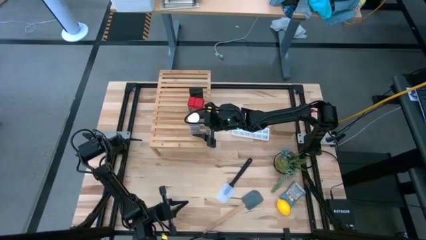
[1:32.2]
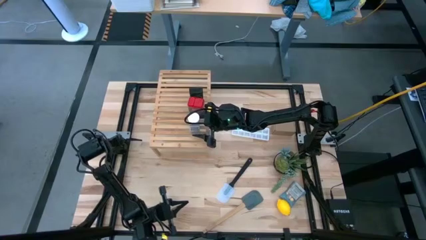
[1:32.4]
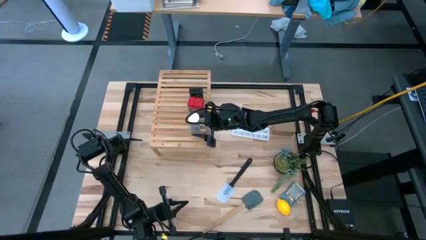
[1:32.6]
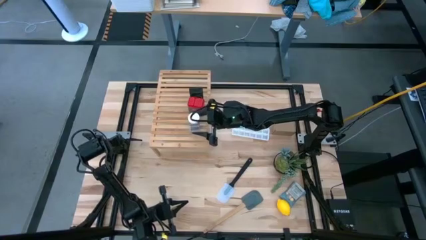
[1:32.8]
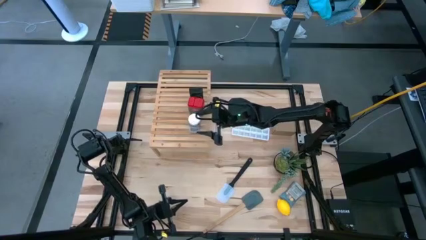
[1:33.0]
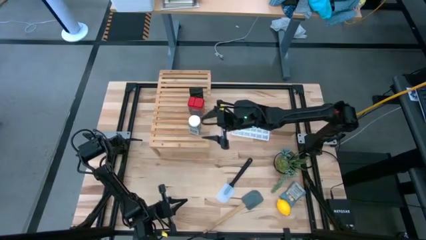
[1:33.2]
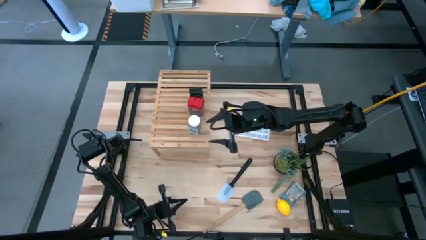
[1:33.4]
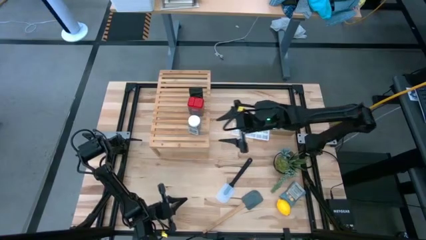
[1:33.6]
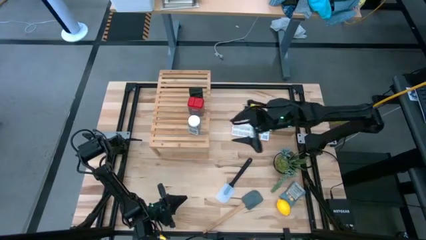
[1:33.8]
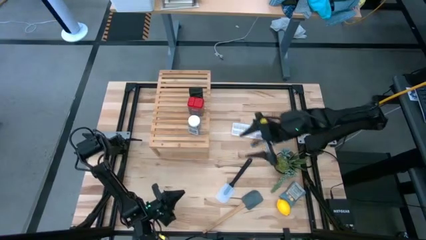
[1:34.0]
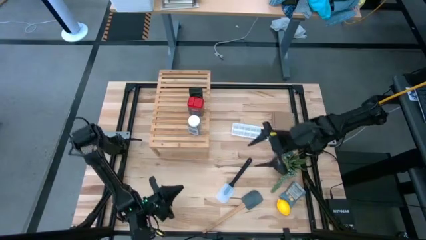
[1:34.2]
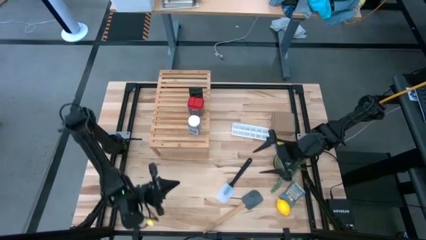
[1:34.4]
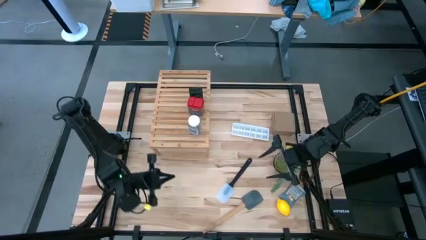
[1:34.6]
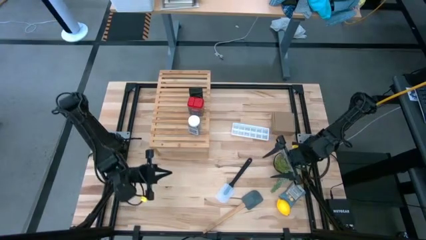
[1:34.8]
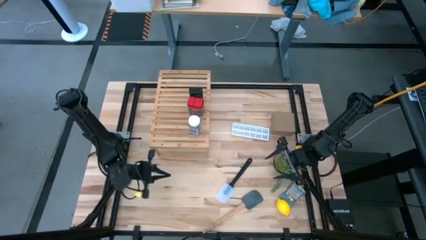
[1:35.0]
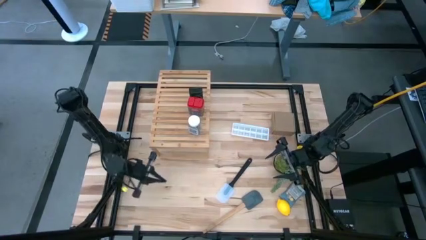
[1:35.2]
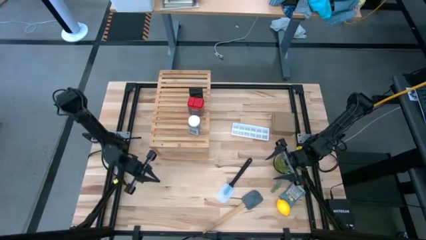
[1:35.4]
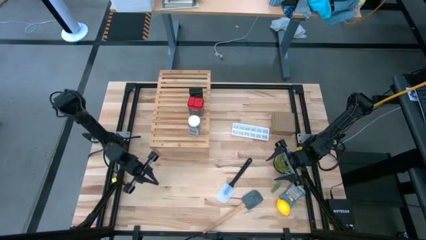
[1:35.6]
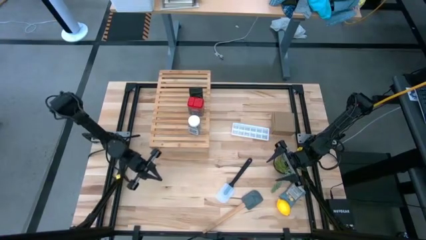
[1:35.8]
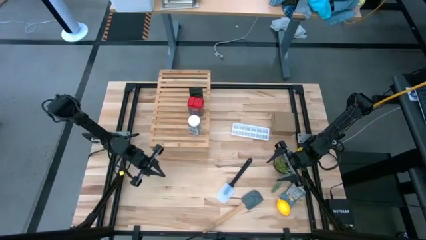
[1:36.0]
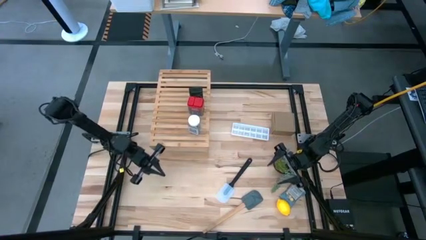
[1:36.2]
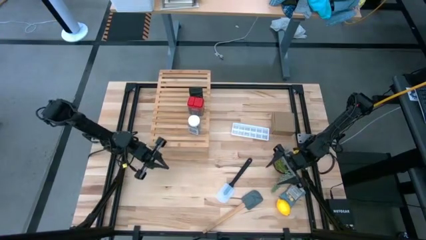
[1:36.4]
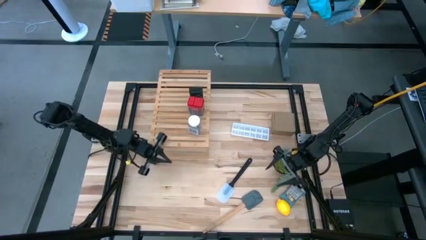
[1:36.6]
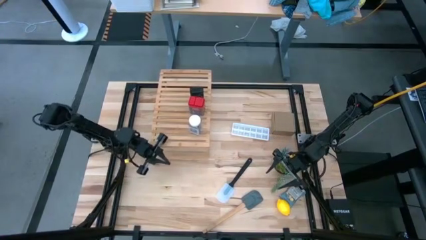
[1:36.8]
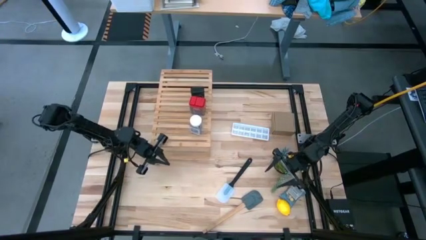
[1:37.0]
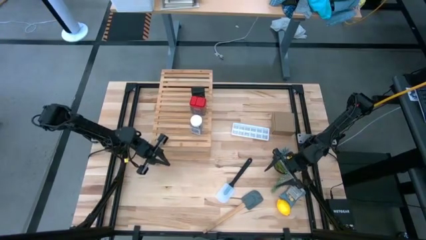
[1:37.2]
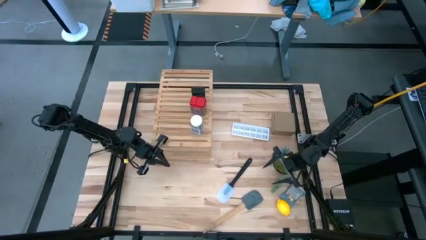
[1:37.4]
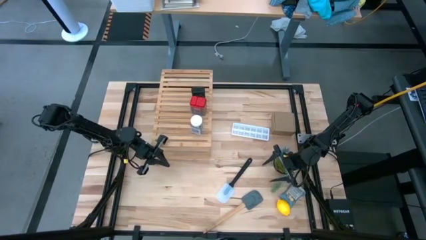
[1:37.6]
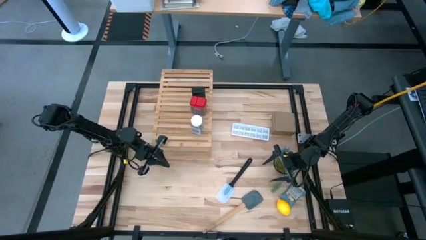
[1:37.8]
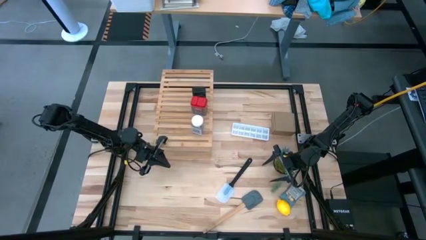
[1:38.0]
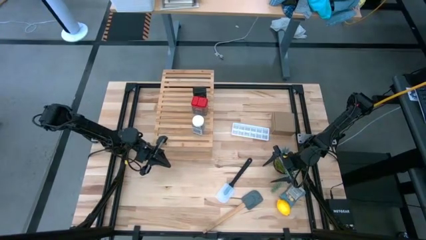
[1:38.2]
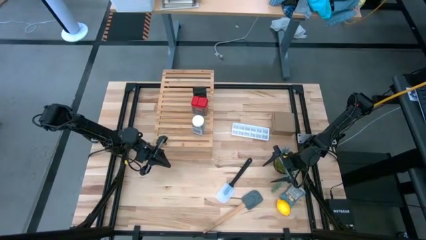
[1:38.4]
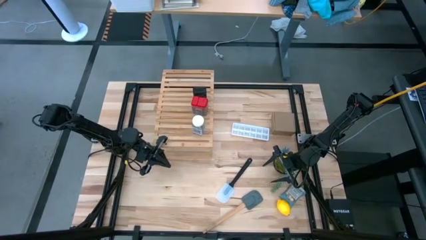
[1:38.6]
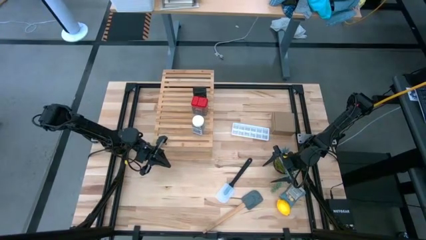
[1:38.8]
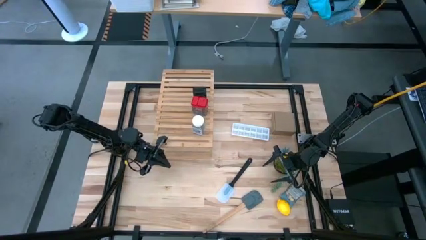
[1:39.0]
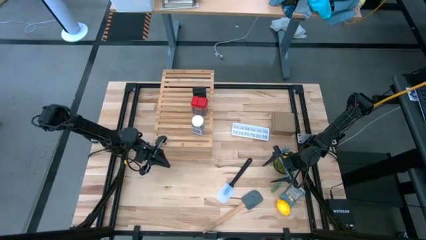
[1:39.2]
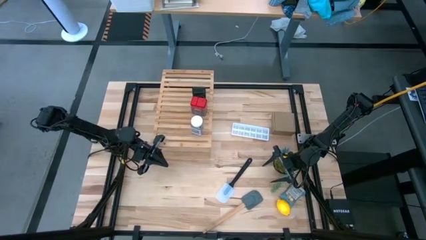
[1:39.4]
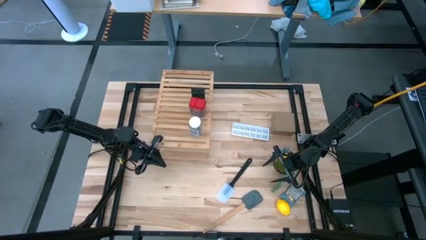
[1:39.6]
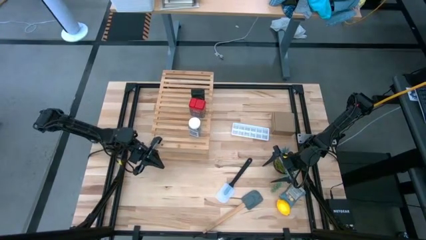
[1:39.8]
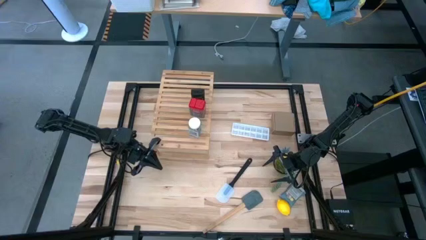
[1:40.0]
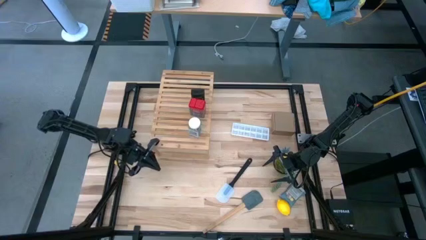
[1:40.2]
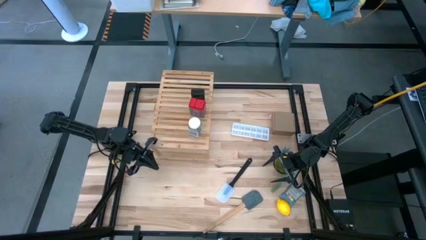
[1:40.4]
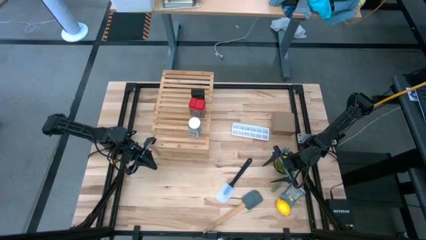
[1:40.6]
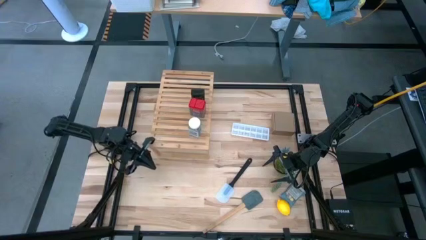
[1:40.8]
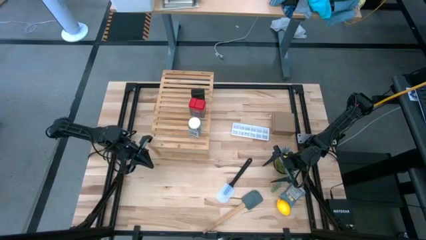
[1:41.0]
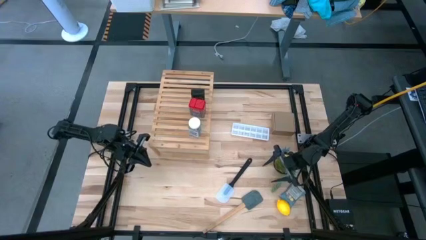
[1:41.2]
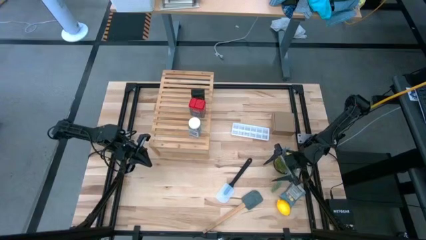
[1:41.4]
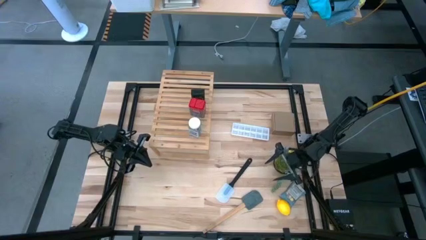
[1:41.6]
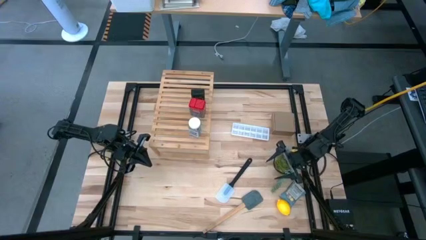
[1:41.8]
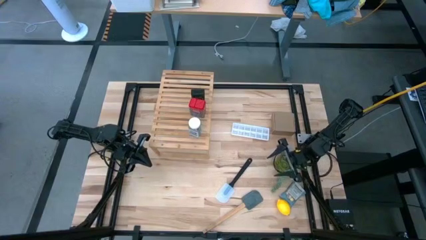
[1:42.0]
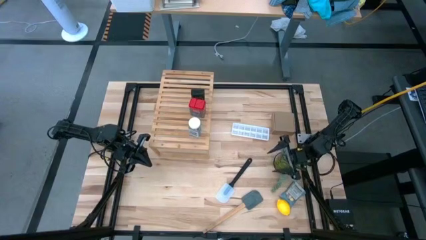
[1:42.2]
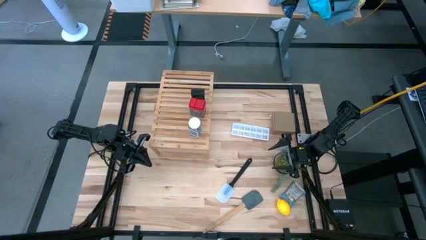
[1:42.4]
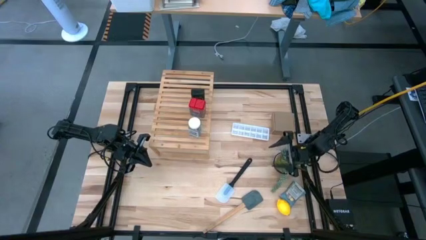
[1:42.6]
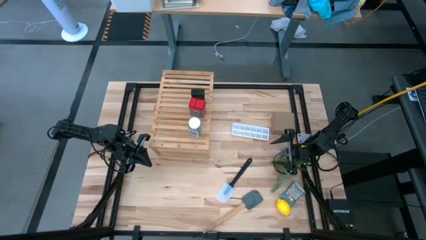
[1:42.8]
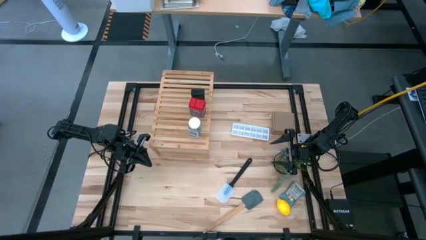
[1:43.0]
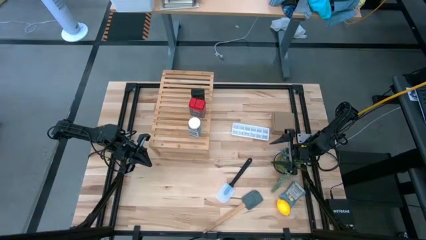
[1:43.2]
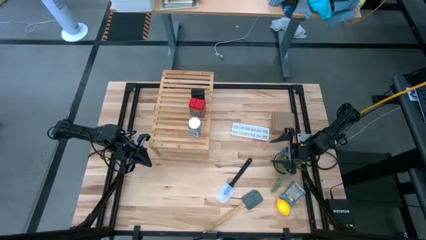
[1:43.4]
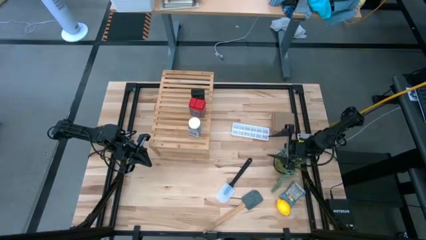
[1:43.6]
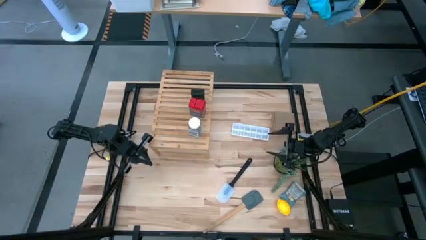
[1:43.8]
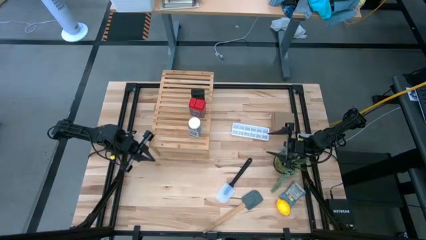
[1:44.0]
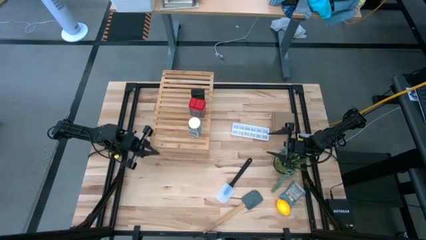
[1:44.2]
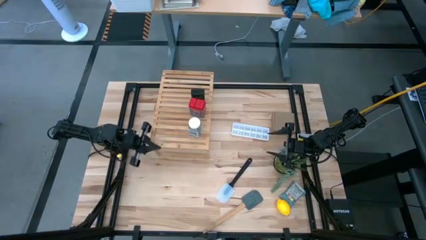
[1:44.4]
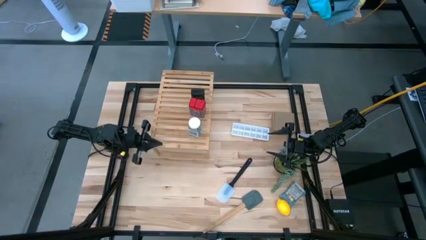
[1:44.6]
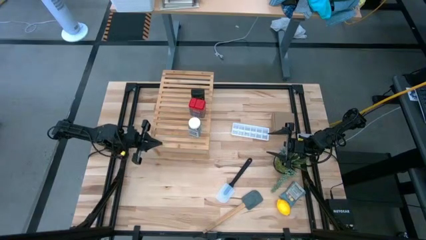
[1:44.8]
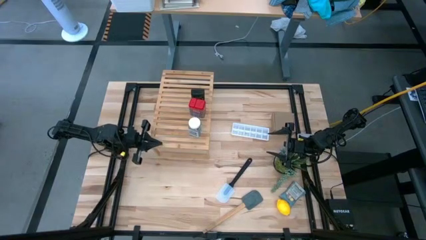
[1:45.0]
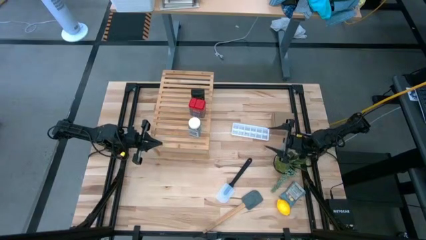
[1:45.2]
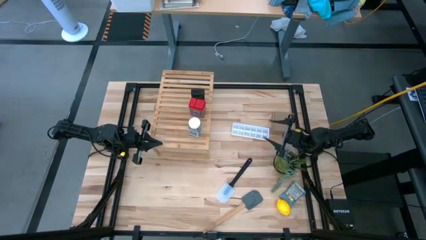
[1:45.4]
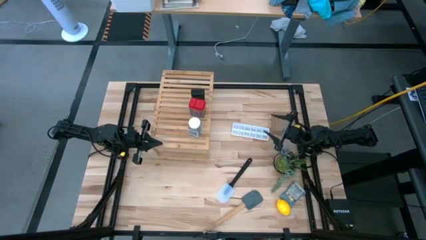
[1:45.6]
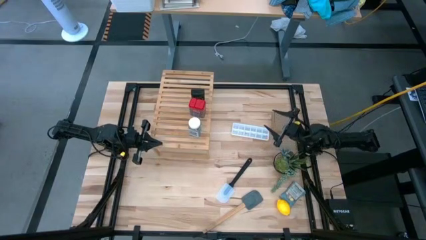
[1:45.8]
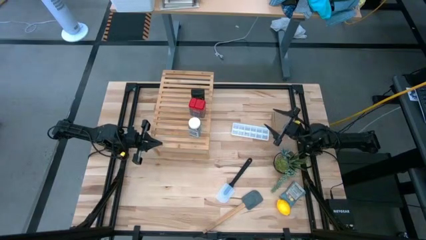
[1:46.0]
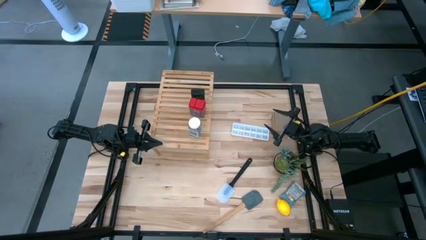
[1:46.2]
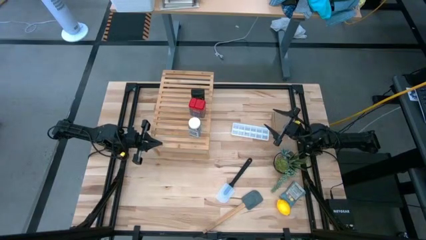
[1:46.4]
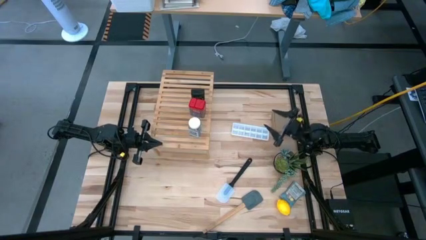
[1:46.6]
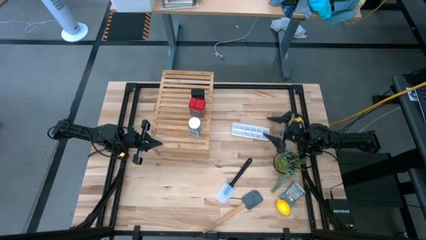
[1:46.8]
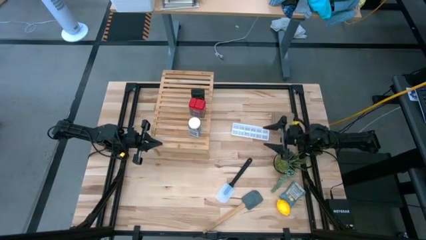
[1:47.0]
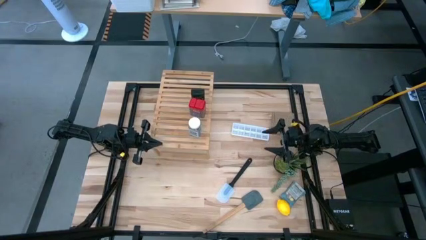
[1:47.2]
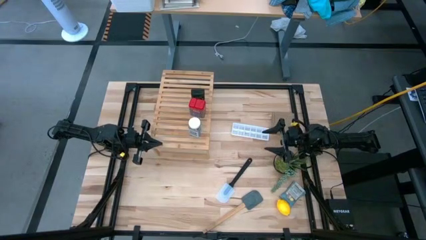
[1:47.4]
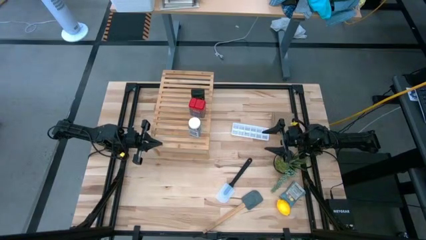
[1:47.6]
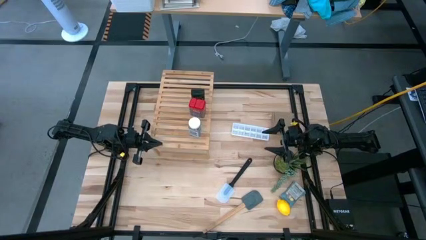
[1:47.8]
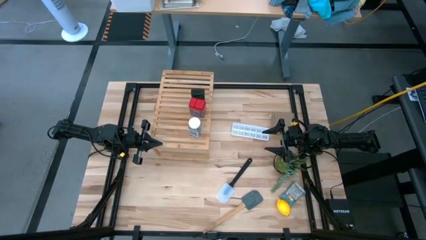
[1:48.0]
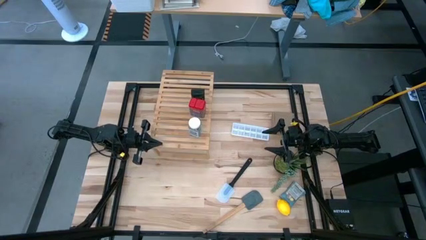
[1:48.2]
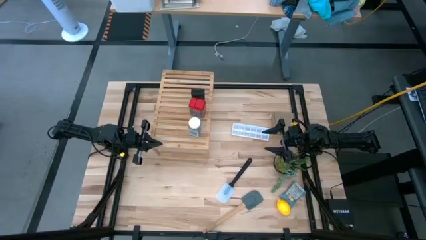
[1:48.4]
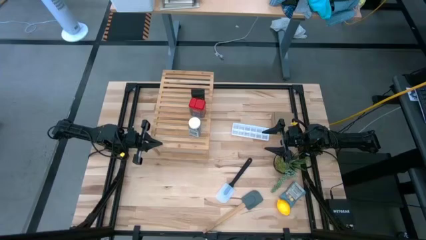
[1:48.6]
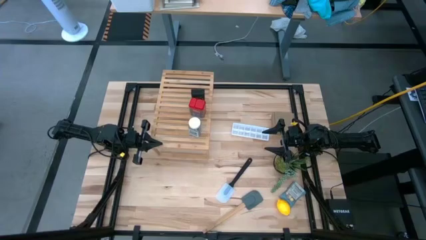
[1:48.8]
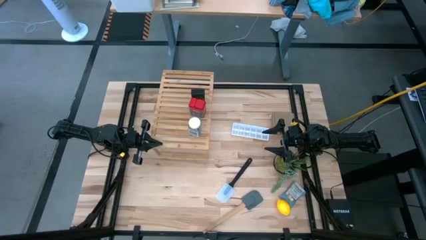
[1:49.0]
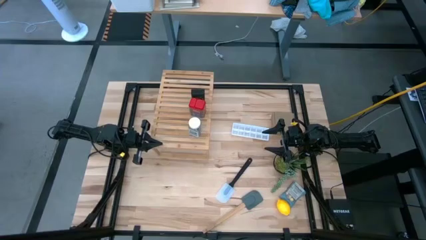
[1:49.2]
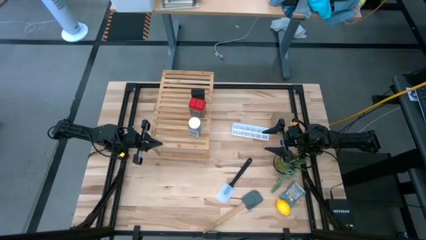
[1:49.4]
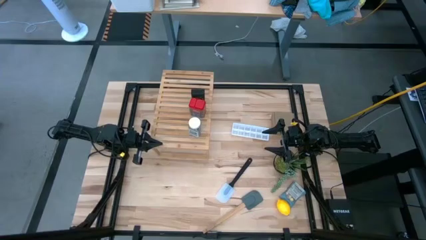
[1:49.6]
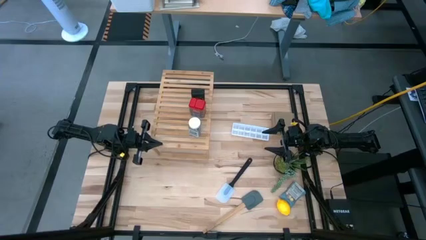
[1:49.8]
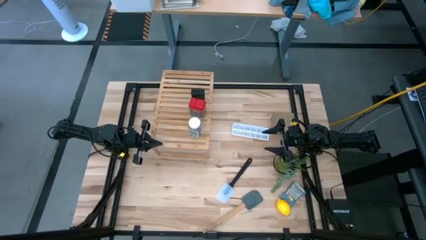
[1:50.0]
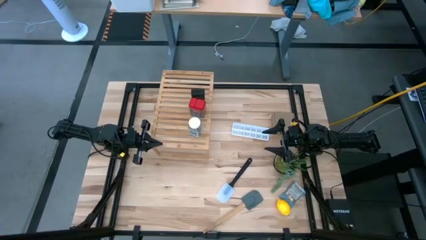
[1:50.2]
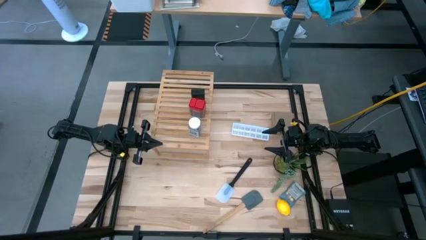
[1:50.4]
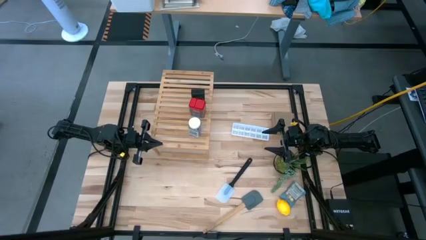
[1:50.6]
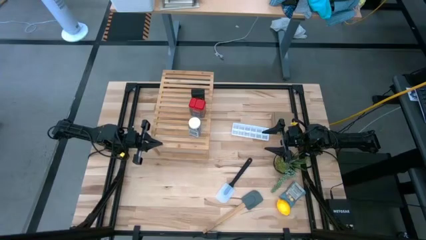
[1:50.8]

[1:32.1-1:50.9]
Task: Shelf spices
Return to Home Position
